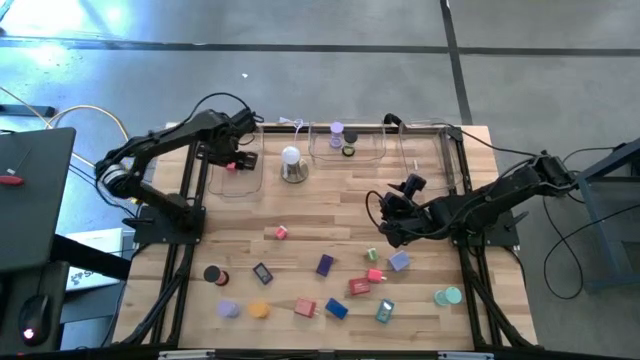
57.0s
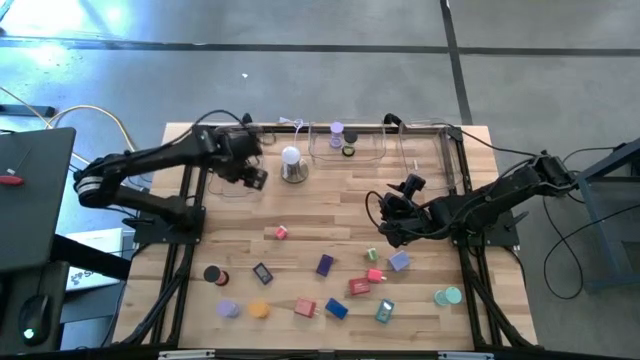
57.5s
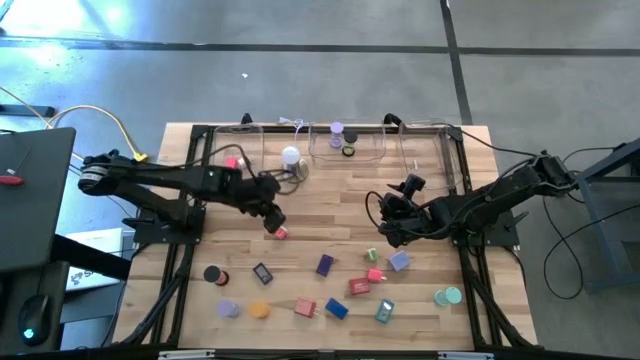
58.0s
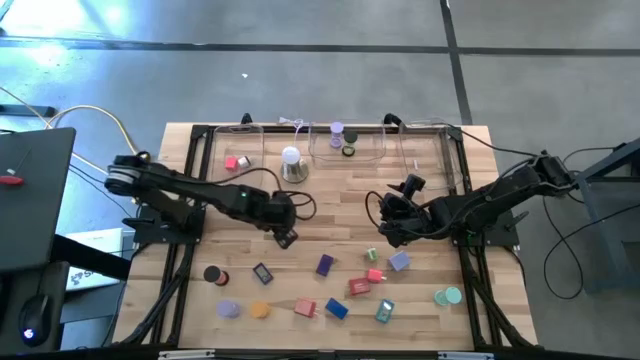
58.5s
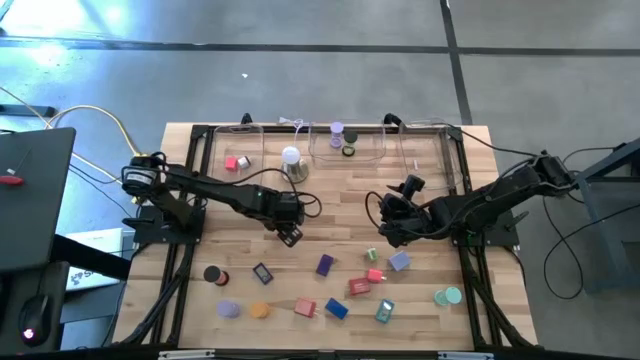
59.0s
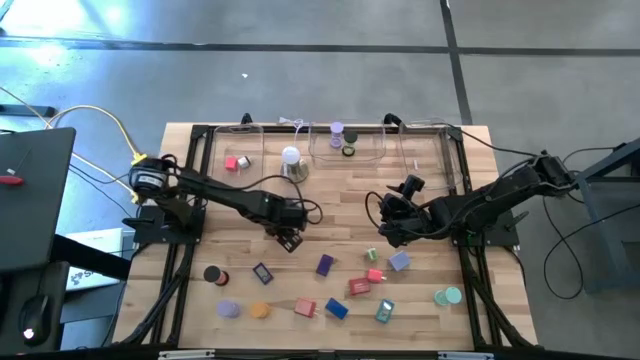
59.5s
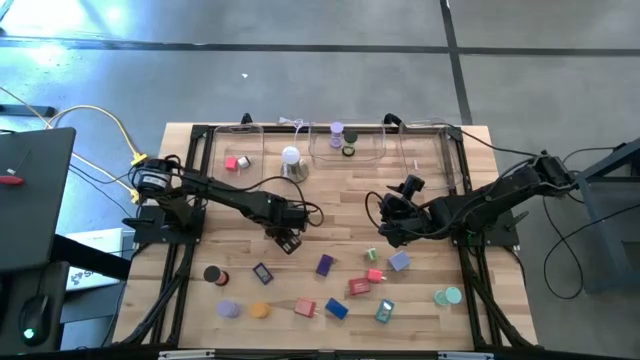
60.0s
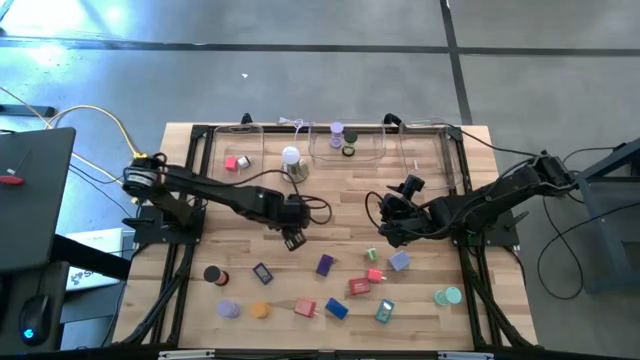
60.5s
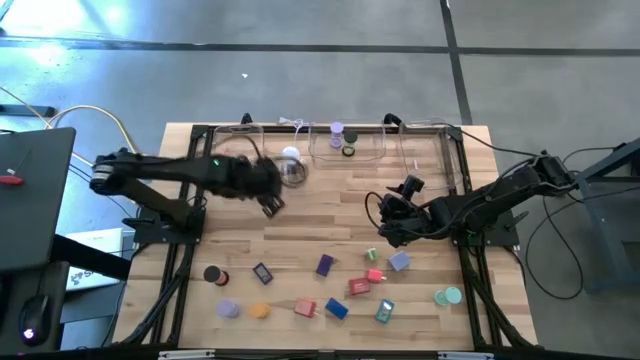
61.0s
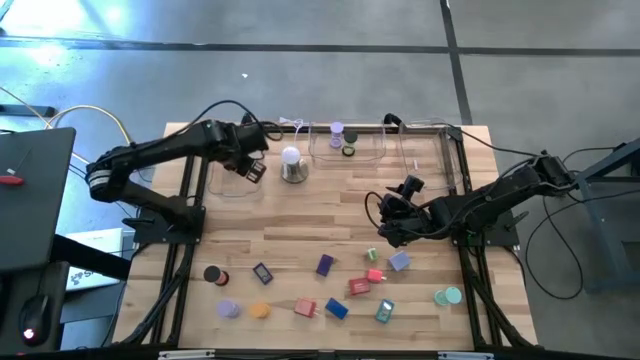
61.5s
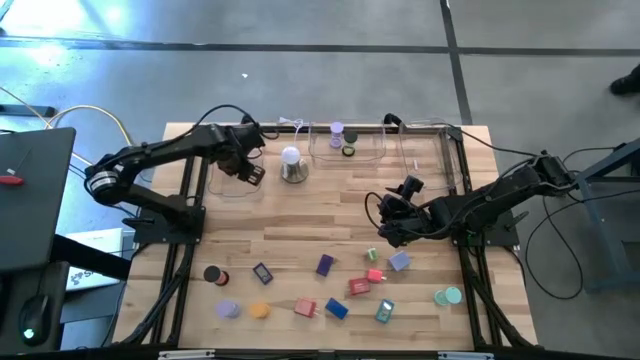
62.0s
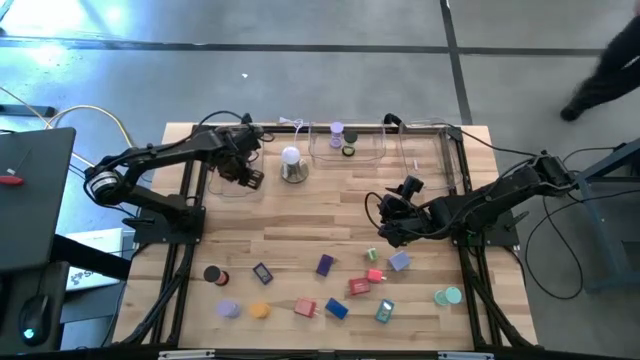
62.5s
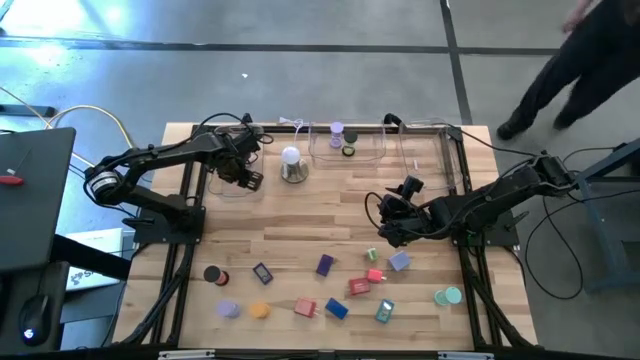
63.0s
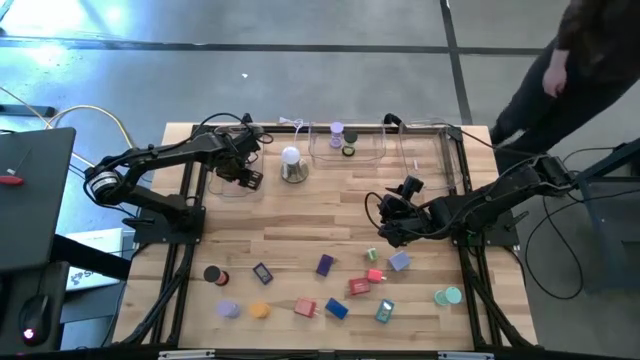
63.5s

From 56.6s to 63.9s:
Task: Pick & Place Office items
Put the white and pink charger adapter into the left transparent bin

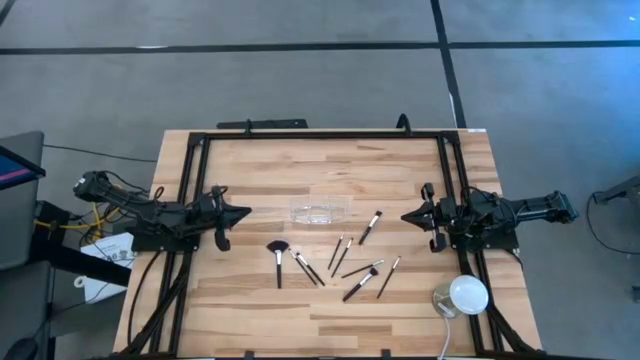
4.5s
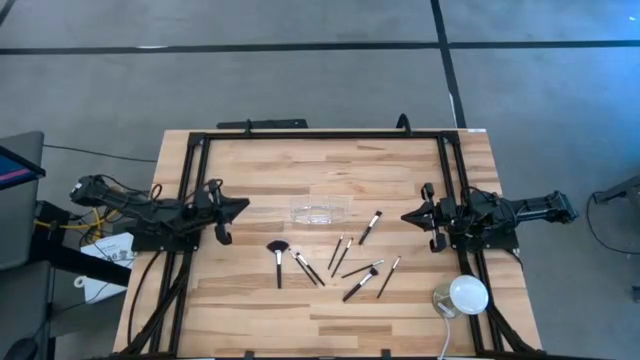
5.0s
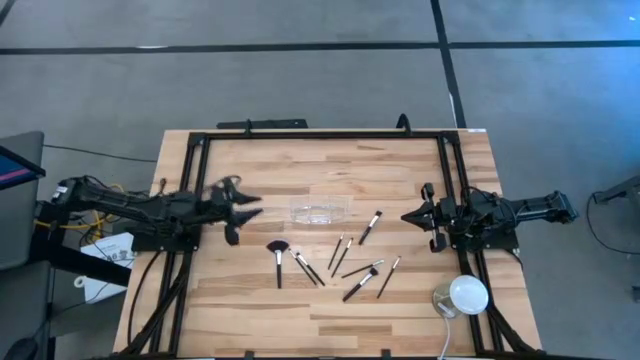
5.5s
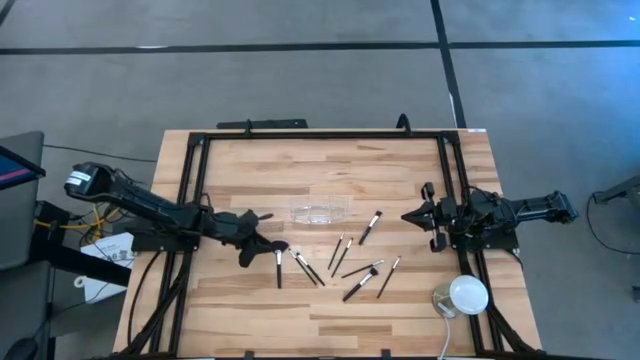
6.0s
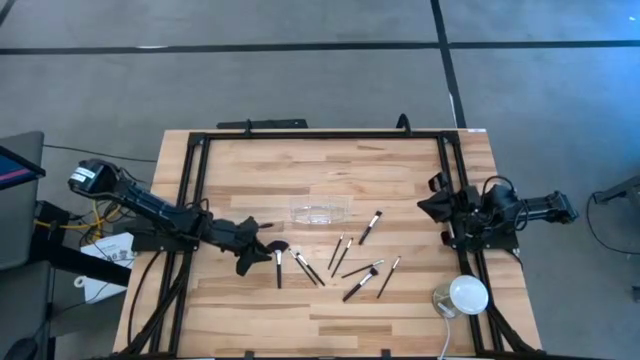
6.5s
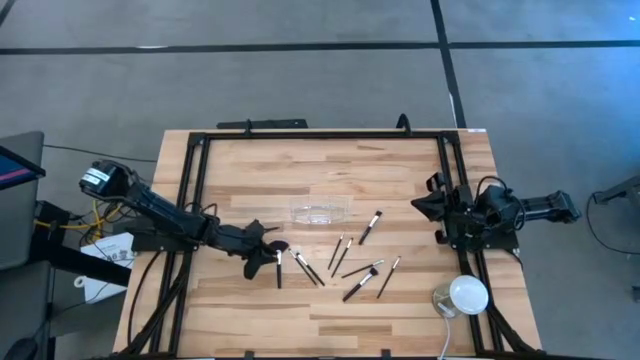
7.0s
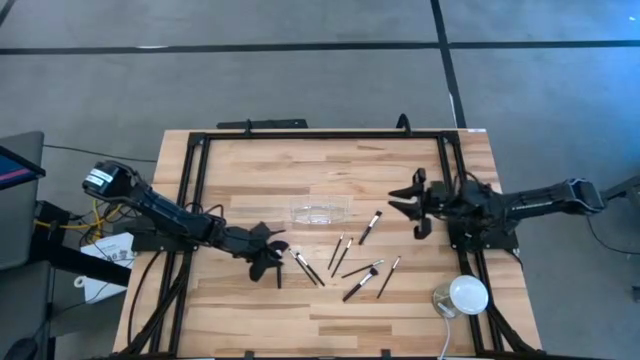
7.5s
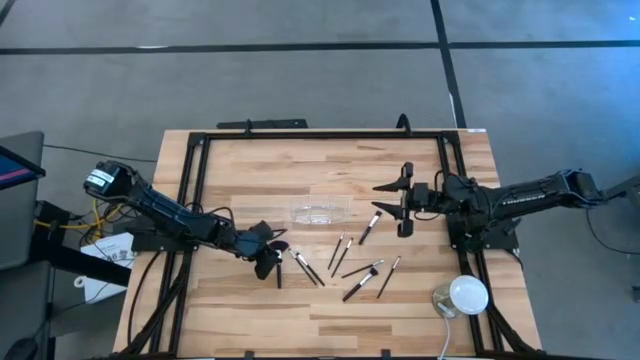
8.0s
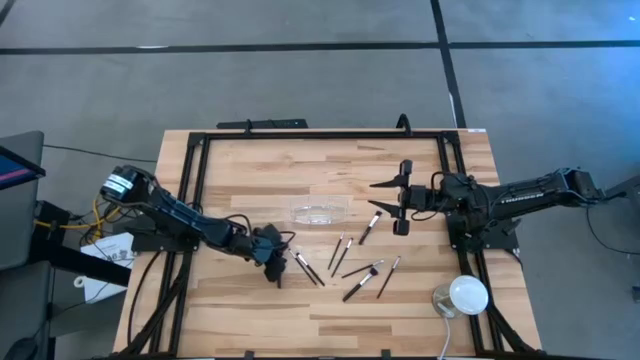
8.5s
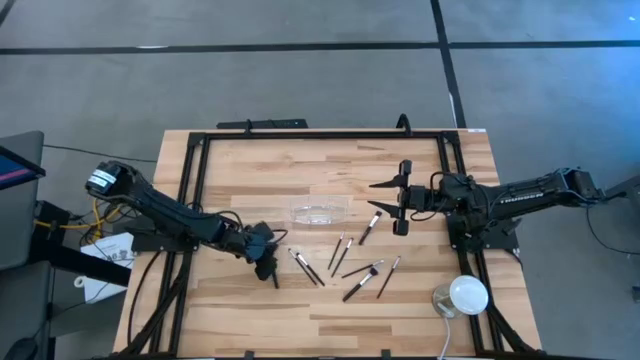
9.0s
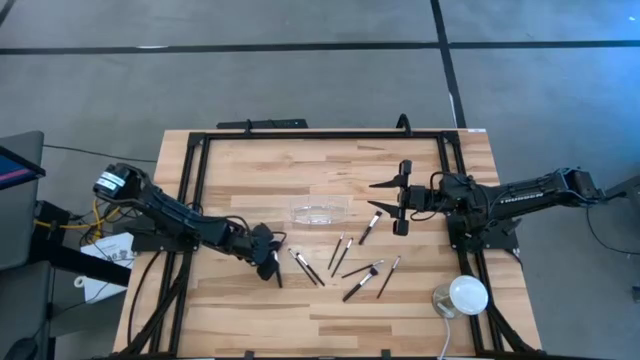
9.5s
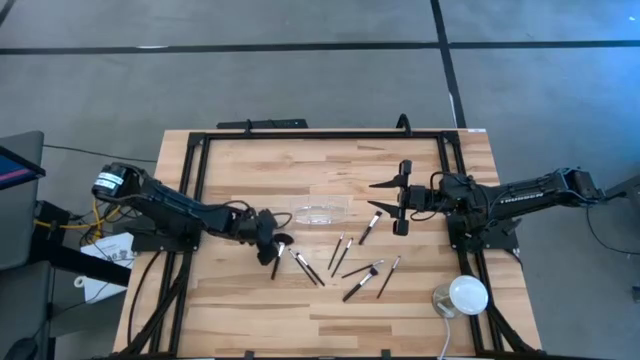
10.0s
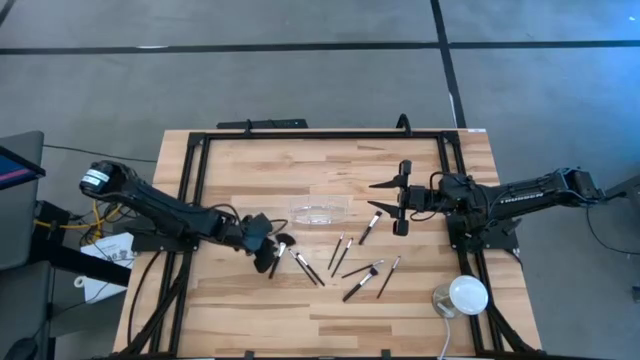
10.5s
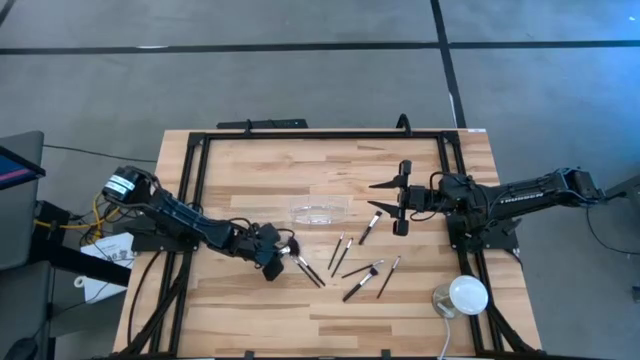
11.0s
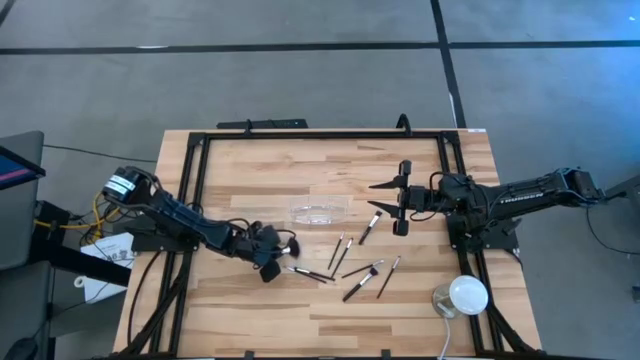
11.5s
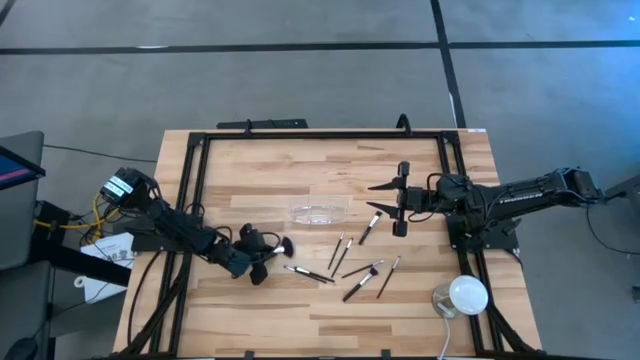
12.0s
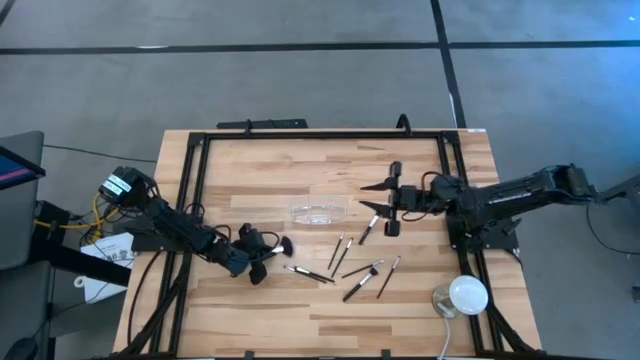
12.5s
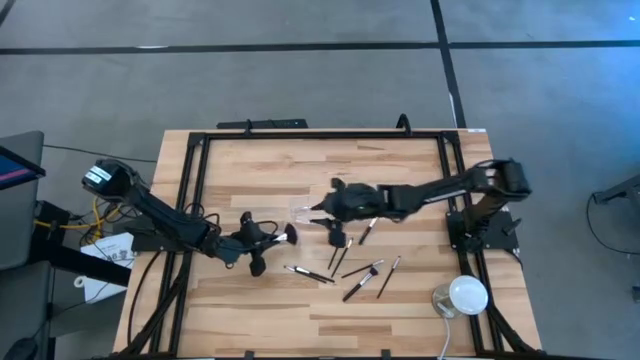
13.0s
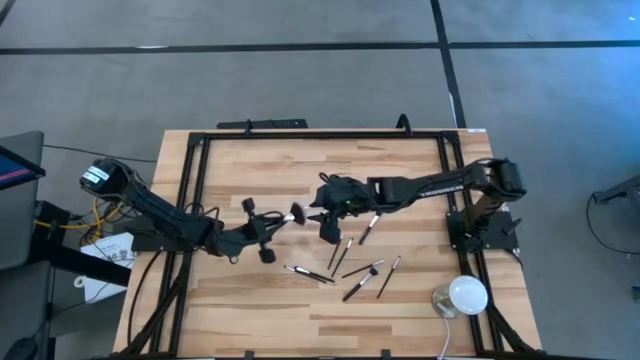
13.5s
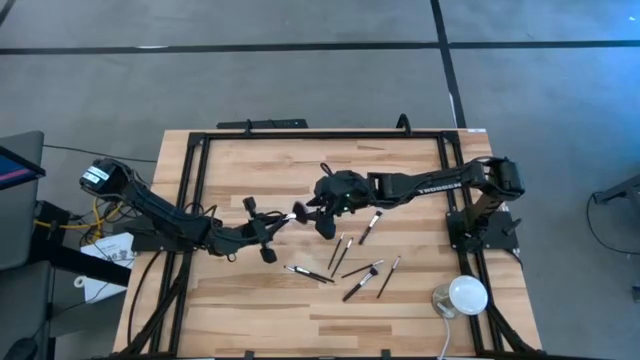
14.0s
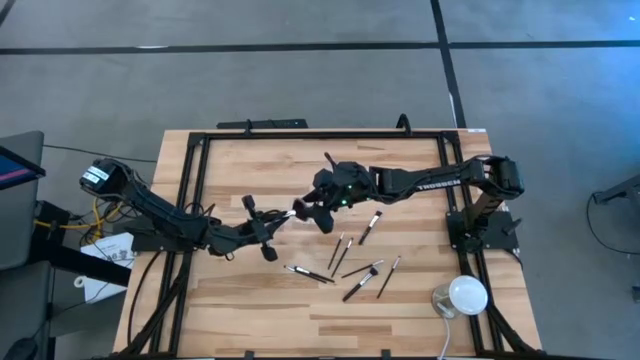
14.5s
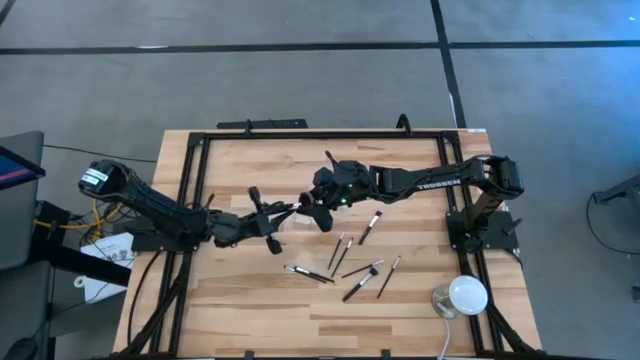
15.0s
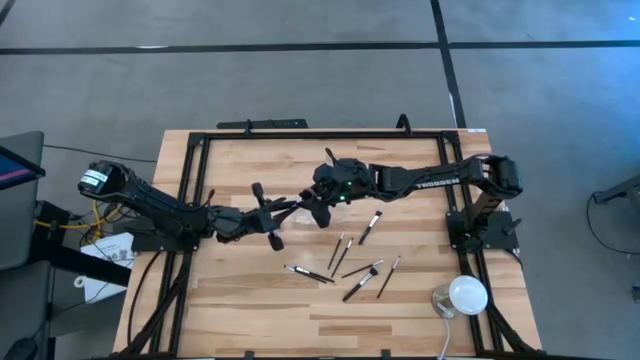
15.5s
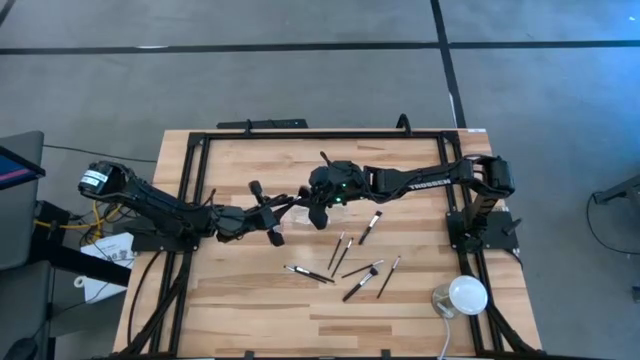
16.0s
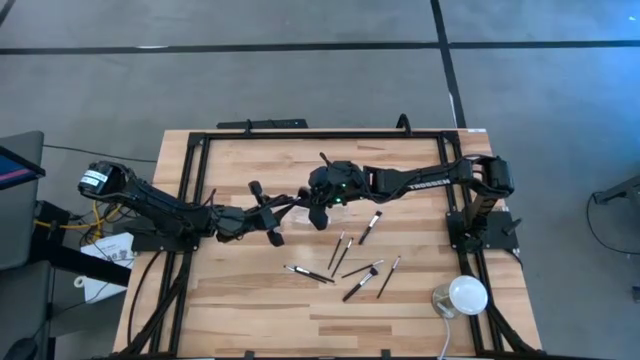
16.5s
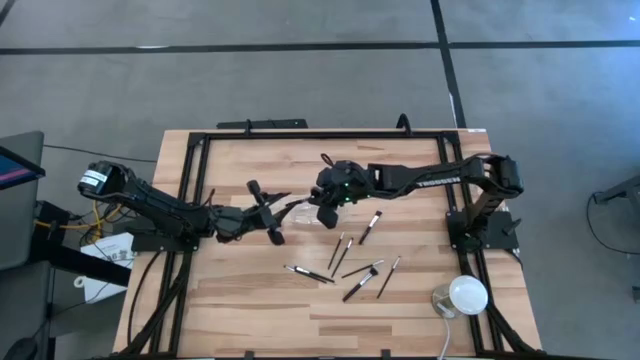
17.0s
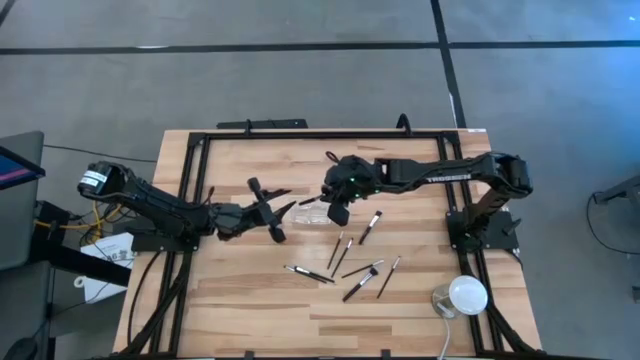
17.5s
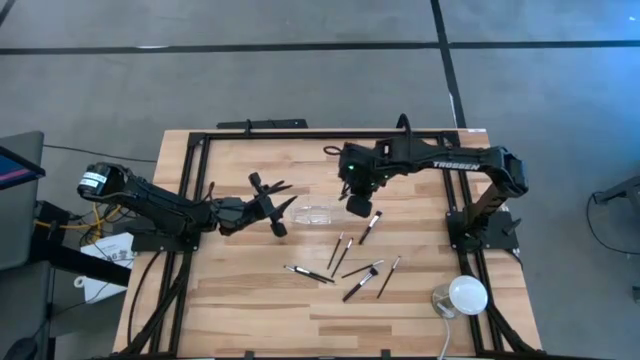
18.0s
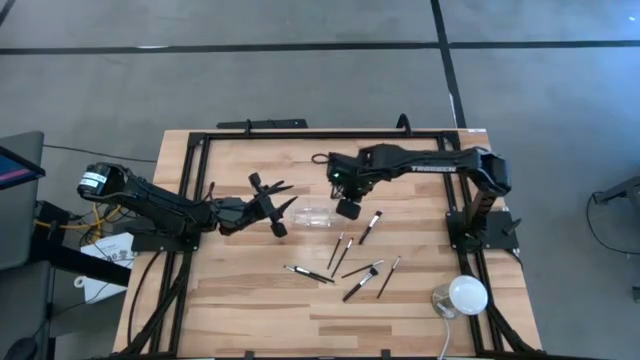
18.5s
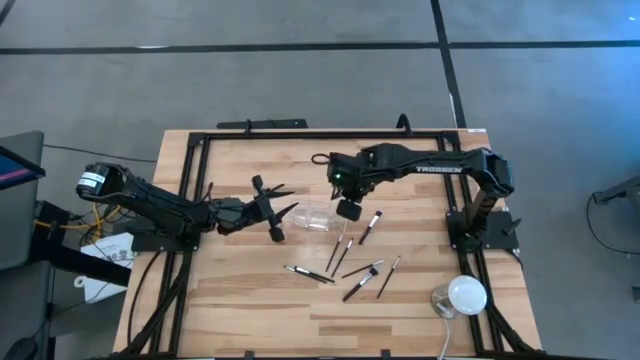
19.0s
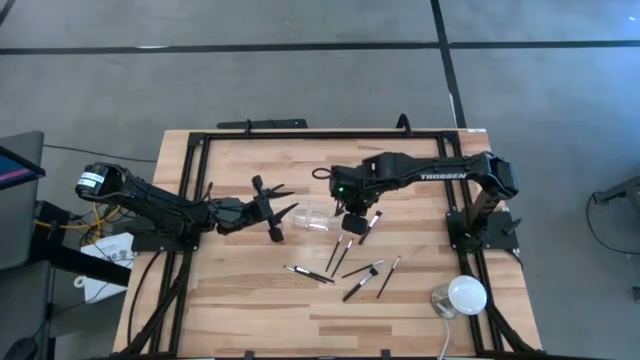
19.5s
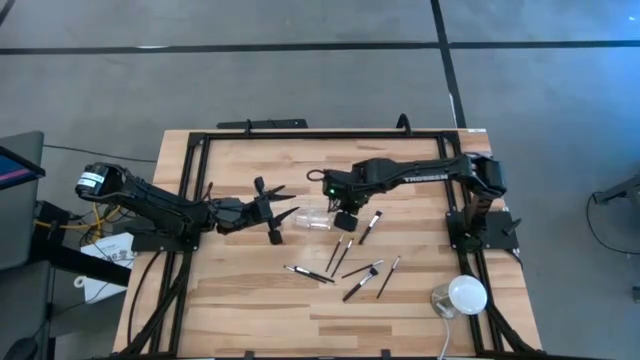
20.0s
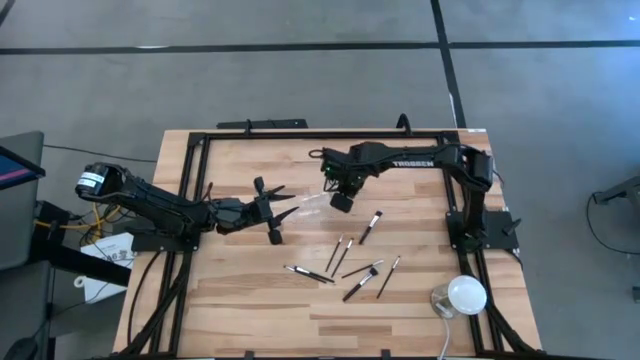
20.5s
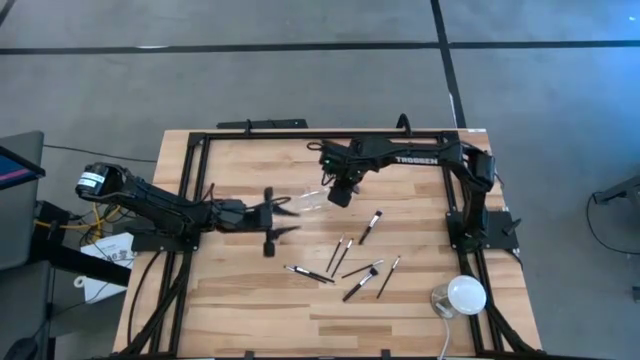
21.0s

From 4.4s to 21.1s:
Task: Put items in baskets/containers
Put the highlighter brush into the transparent organizer
